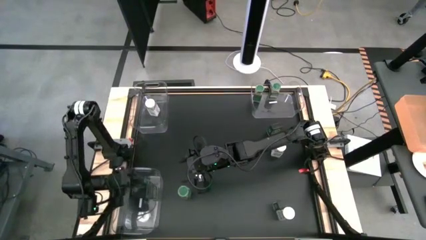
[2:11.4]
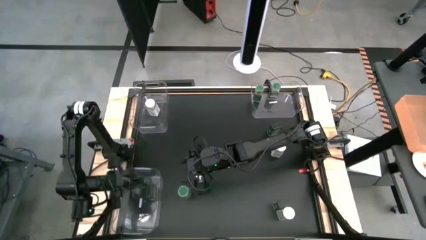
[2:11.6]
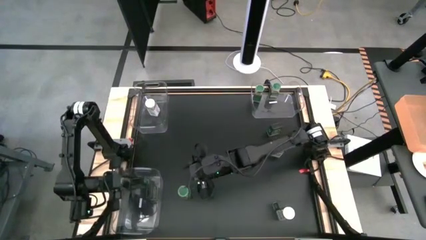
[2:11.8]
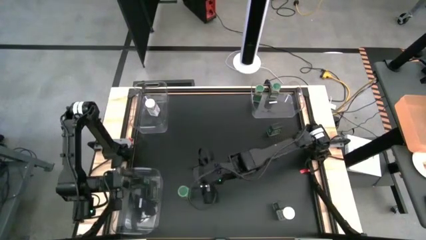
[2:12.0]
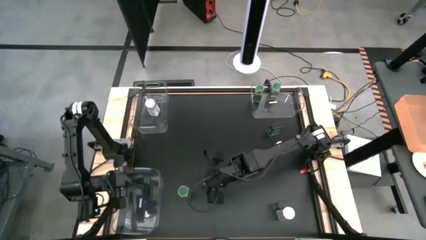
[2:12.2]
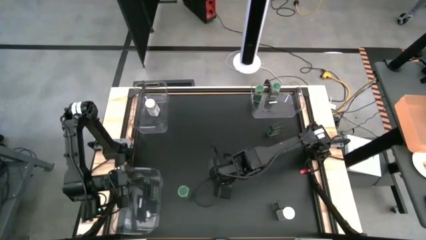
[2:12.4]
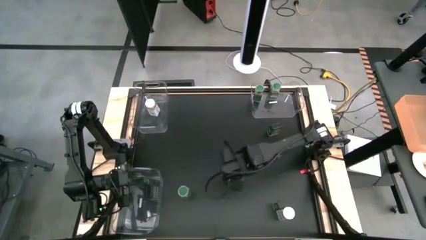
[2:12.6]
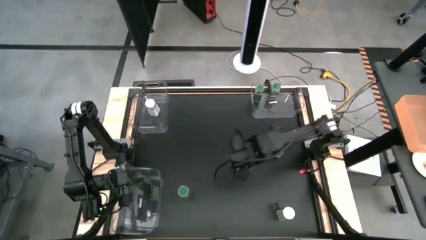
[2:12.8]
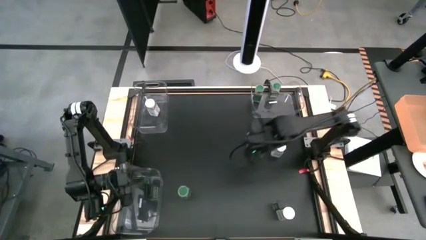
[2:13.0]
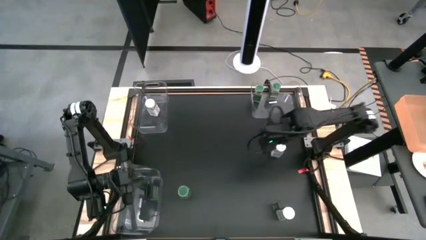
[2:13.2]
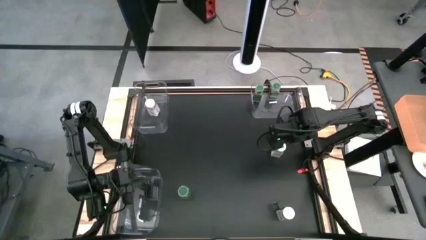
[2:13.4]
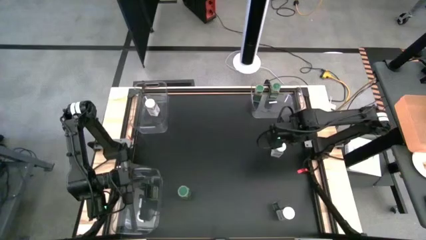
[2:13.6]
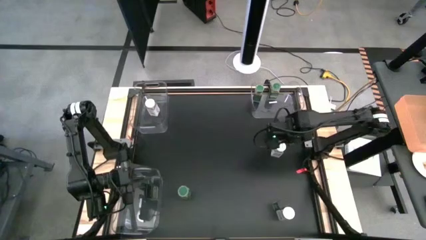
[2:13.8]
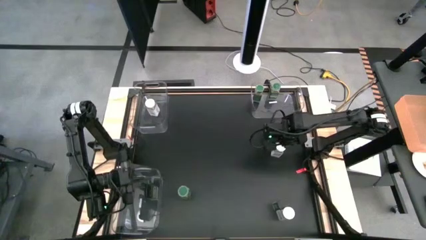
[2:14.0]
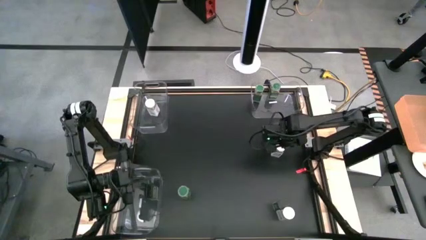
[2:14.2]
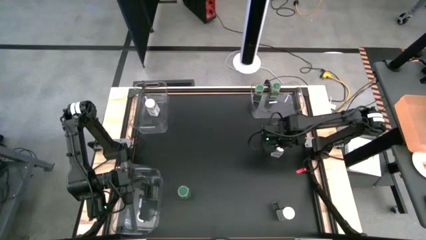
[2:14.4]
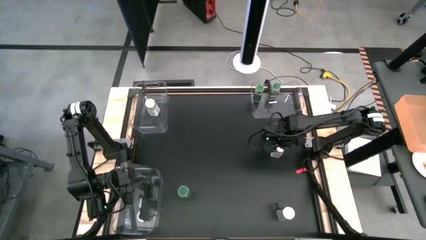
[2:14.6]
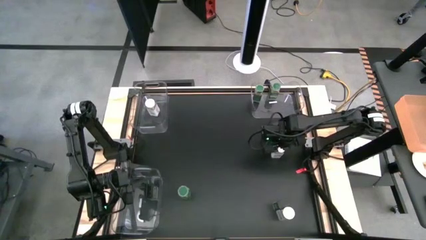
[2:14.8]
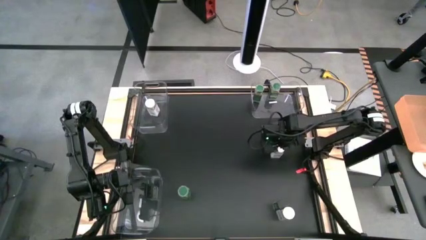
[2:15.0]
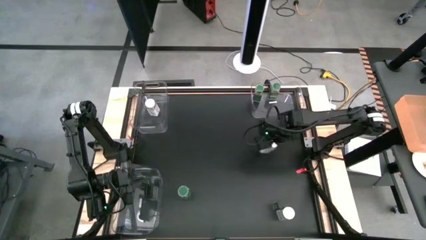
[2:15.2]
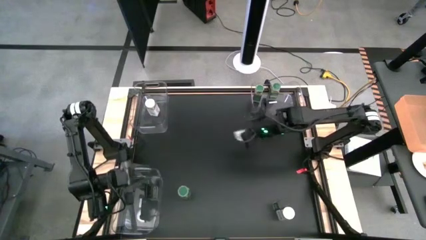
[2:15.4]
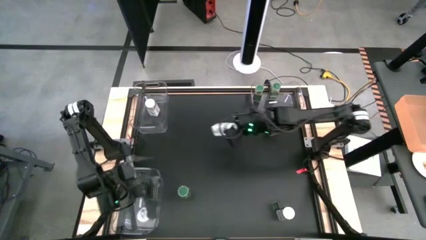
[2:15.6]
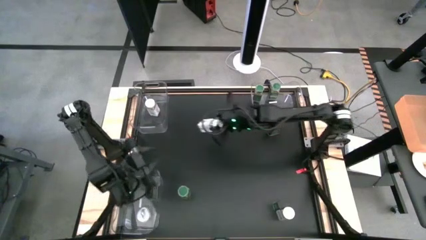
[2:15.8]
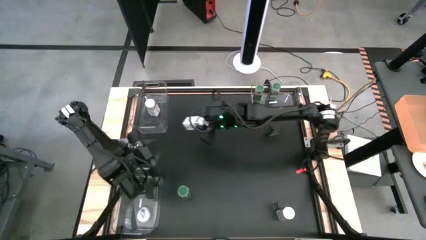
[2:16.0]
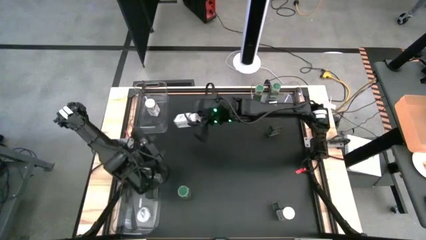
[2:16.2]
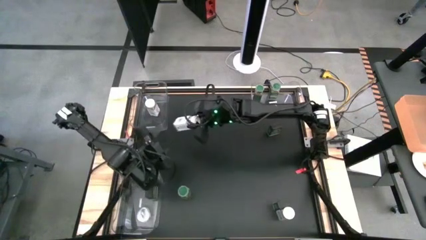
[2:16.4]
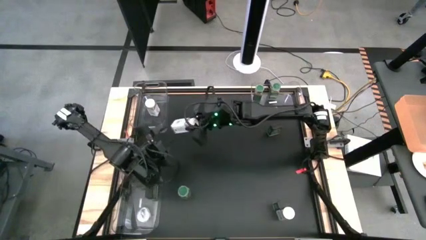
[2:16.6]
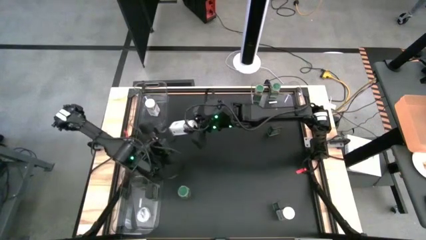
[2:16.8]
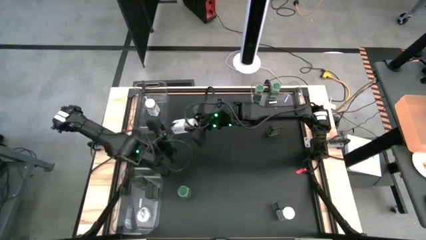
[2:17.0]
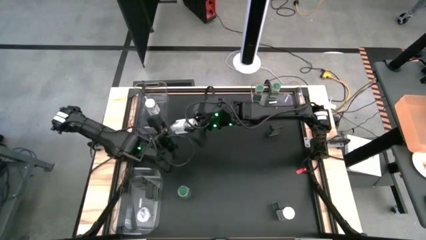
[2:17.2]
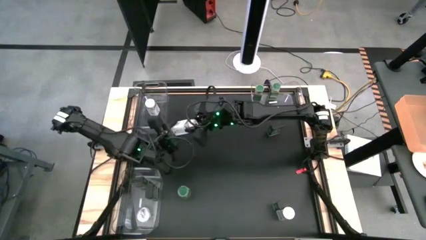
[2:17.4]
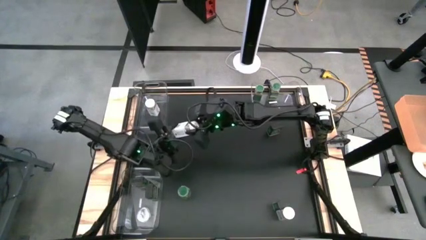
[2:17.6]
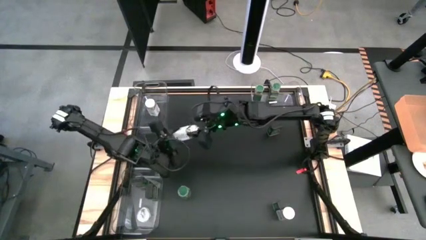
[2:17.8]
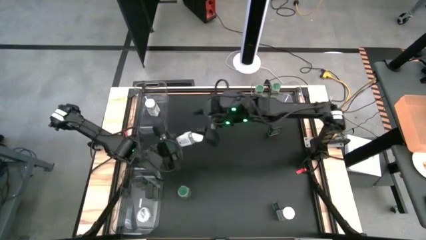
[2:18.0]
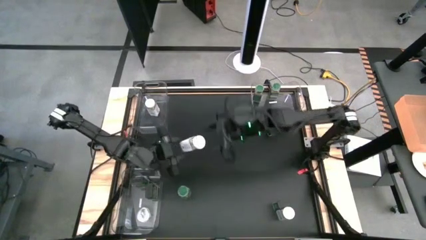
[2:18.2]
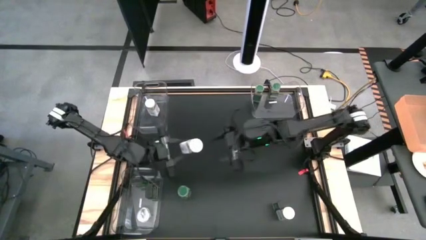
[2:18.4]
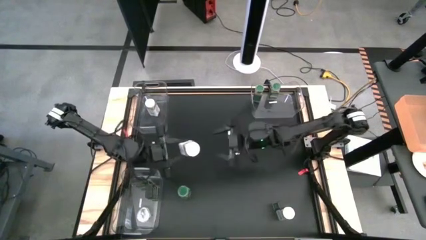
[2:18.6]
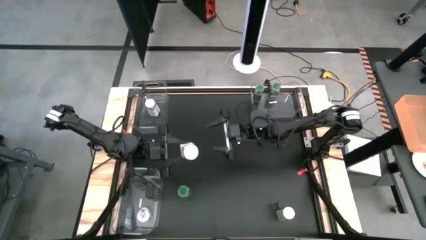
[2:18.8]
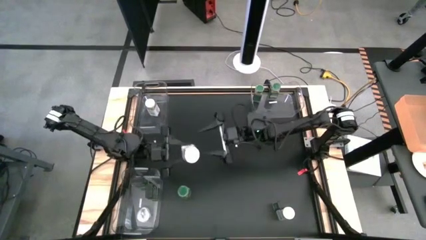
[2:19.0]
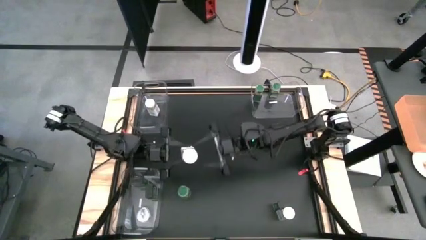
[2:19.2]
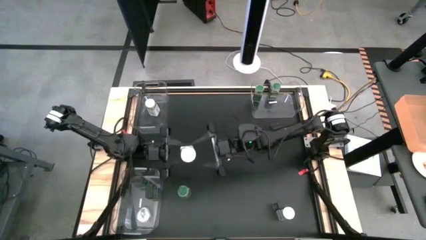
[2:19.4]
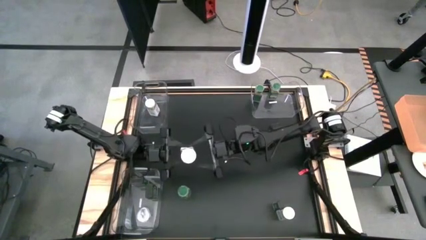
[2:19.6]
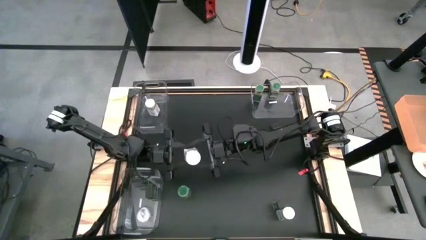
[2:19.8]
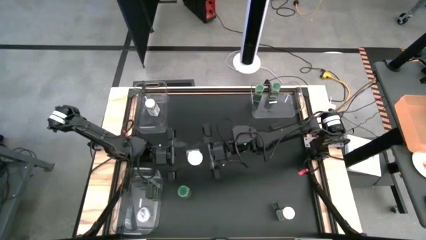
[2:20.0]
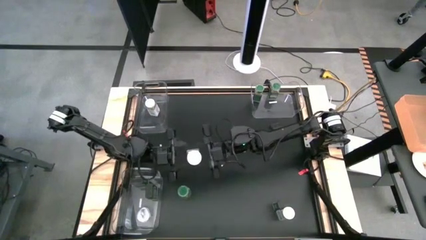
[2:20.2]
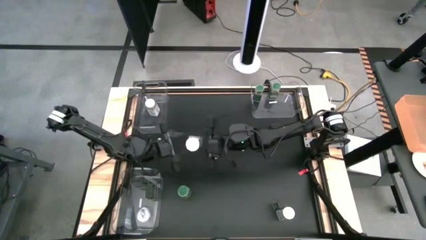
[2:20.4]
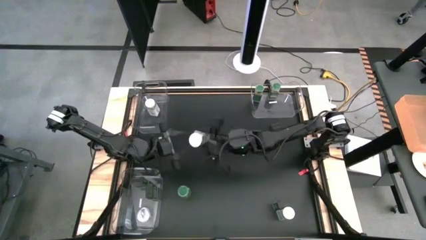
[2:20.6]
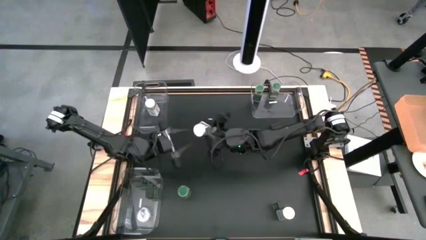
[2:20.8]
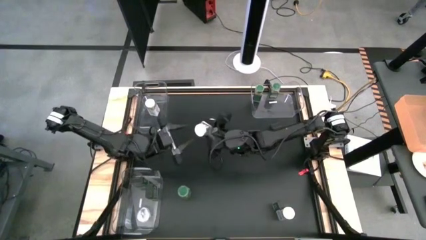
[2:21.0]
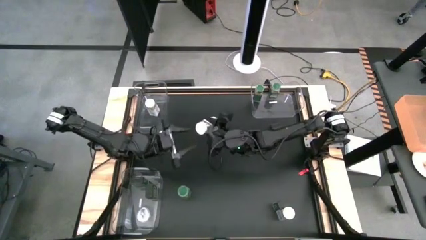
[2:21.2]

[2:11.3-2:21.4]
Task: Sort spices by type
Put the top white seasoning bottle into the top left transparent bin

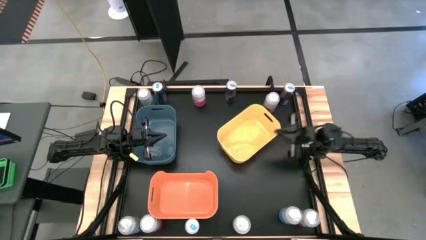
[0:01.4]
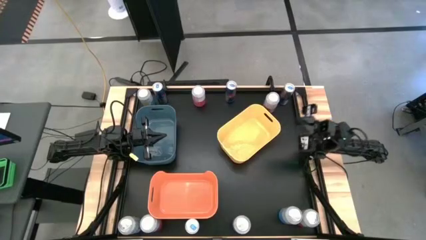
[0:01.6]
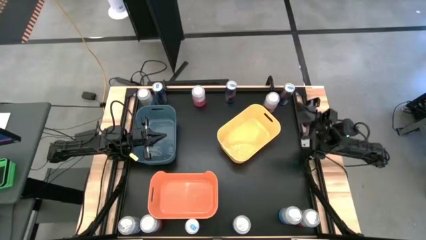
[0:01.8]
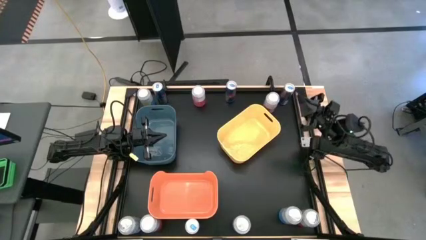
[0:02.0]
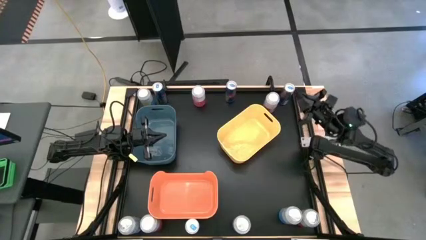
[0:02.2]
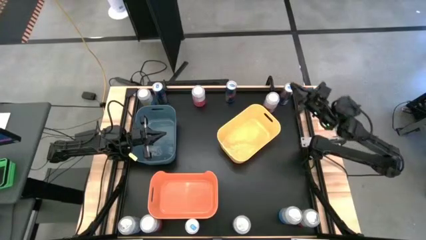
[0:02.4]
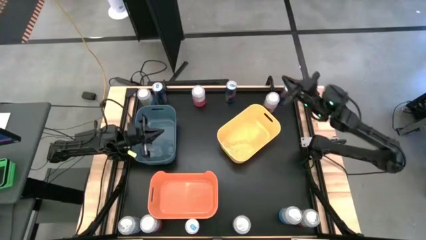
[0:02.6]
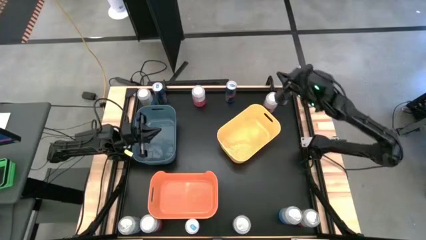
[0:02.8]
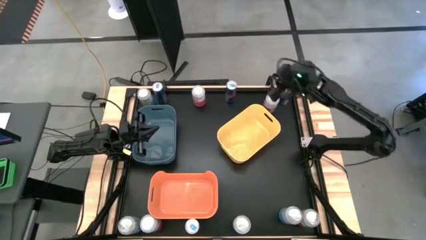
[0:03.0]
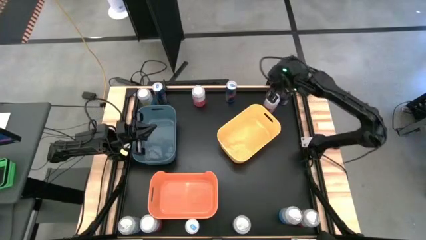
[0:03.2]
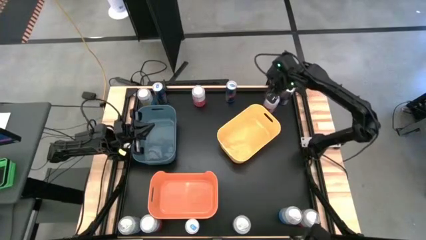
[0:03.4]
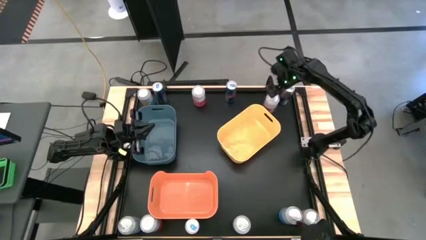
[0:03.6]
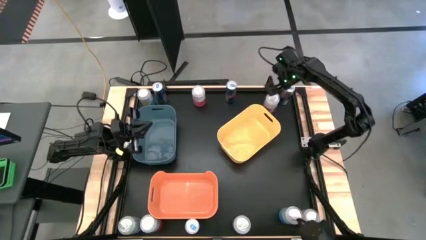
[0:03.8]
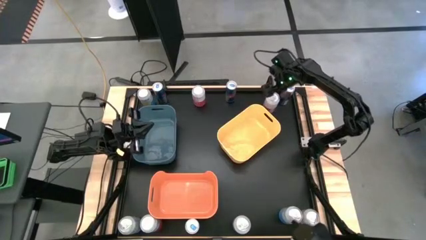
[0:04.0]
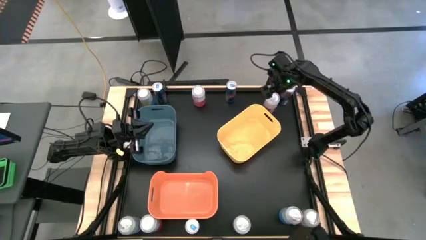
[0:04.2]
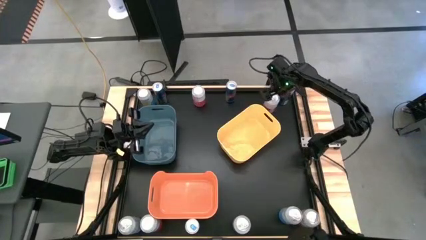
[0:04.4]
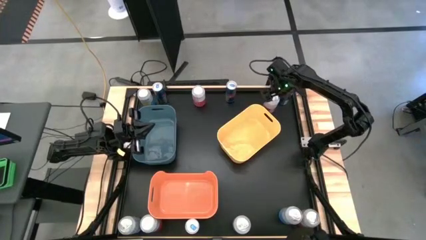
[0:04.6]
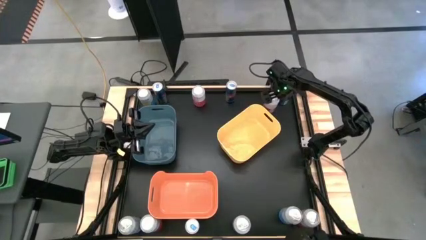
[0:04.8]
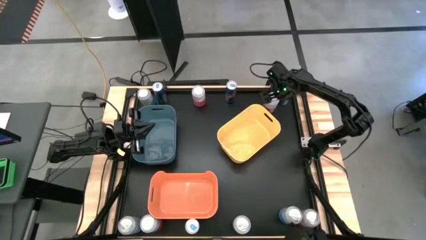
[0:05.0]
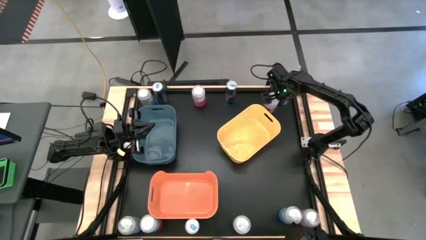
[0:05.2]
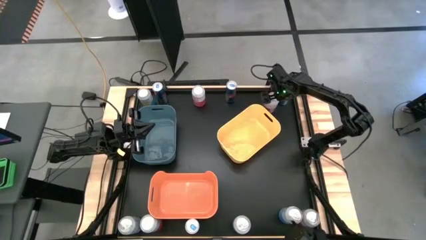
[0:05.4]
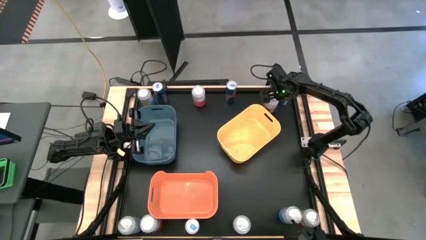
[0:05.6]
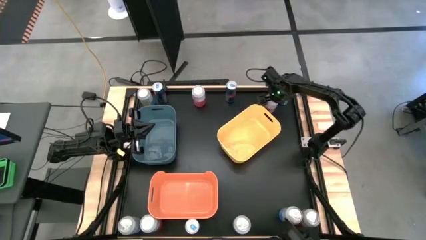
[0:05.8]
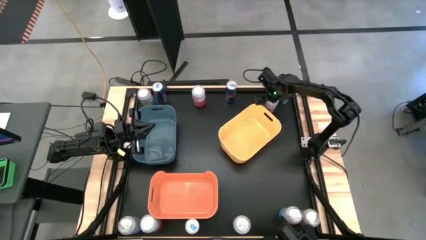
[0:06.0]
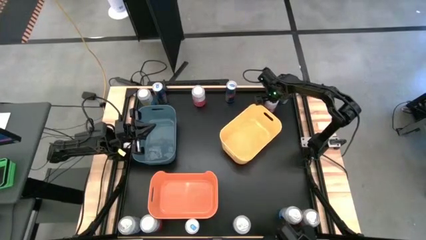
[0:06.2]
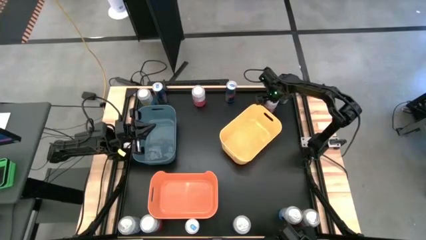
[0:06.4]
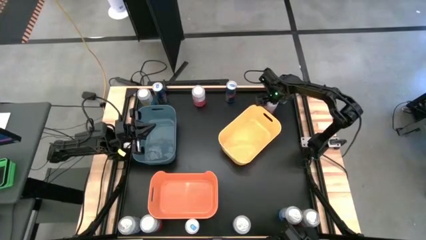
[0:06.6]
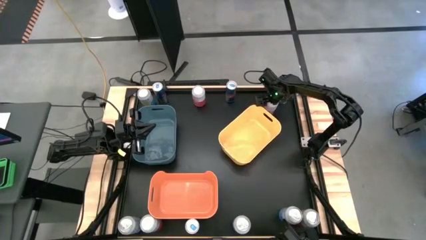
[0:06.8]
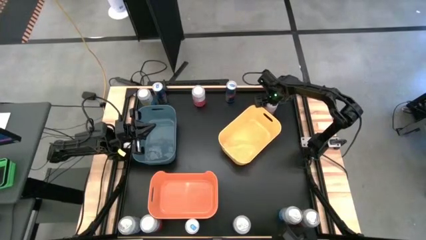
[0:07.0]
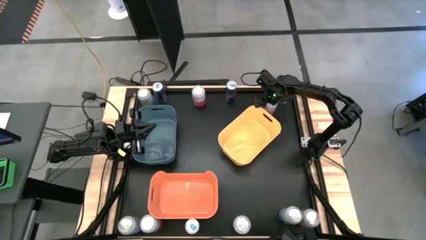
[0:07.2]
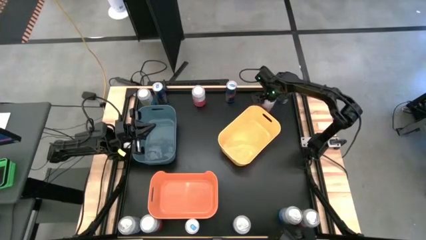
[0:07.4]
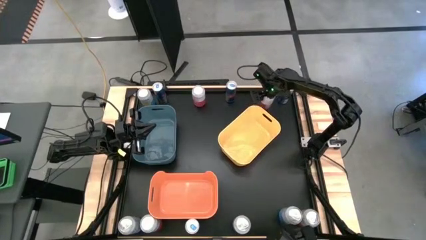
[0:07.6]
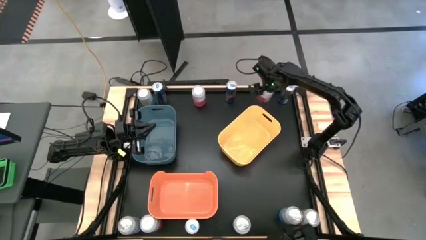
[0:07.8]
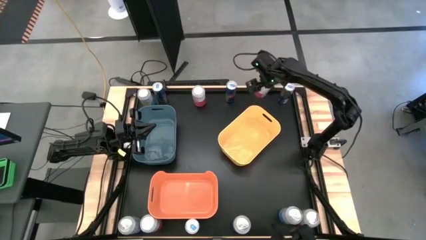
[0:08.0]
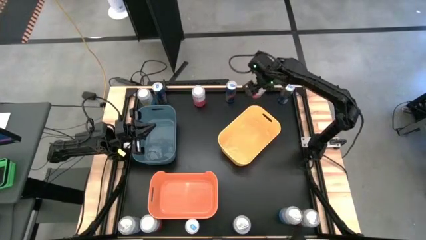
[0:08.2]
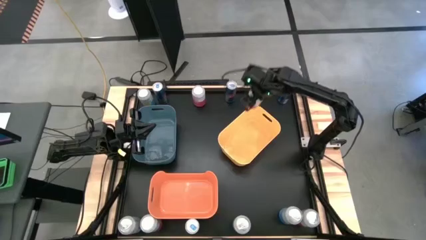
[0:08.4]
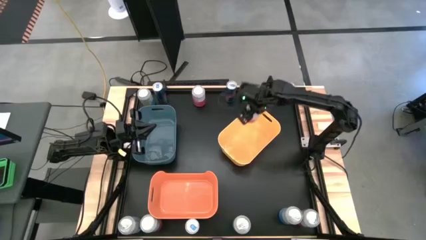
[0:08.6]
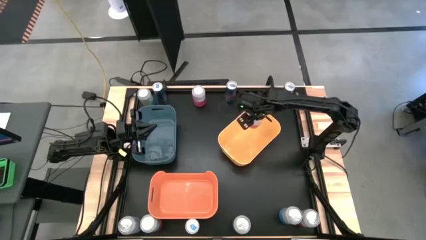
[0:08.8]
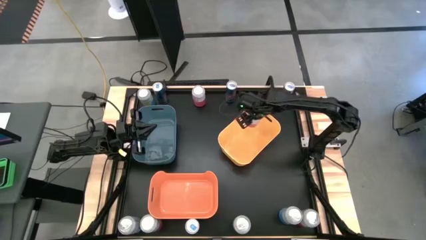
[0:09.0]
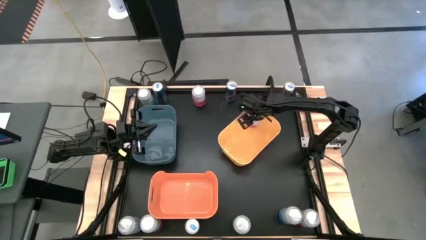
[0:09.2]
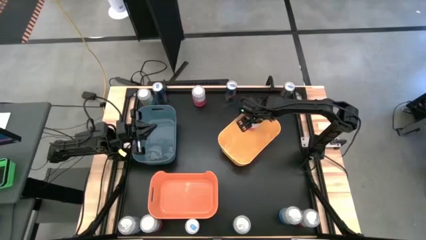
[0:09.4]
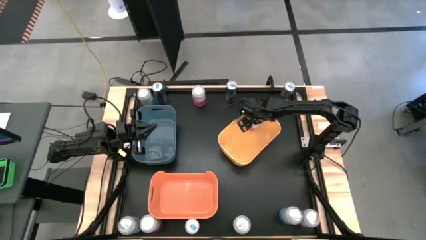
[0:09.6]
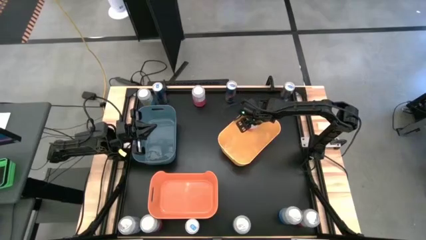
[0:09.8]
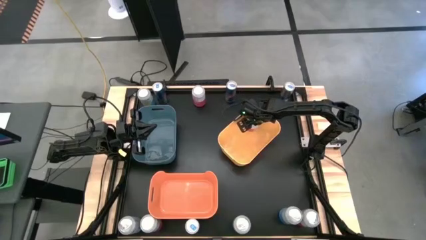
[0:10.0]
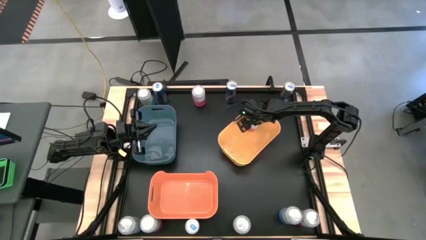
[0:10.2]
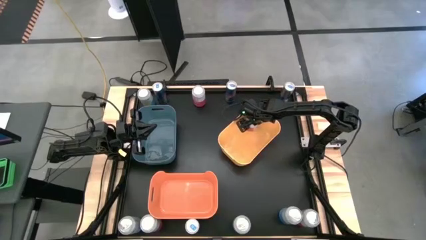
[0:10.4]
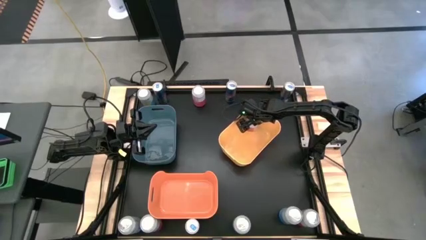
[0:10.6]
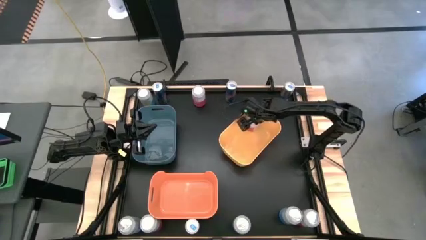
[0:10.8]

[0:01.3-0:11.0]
Task: Sort soda cans
Put the pink soda can into the yellow bin
